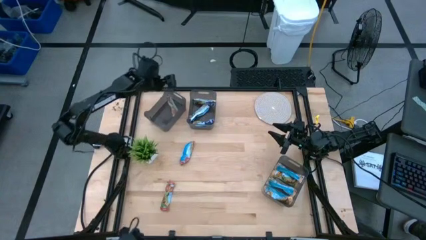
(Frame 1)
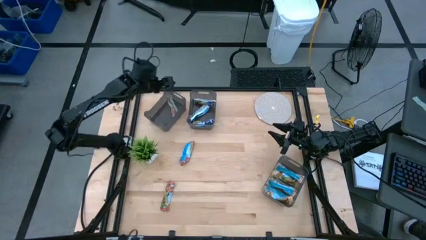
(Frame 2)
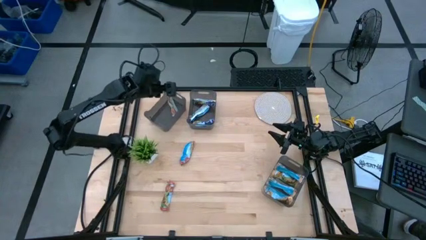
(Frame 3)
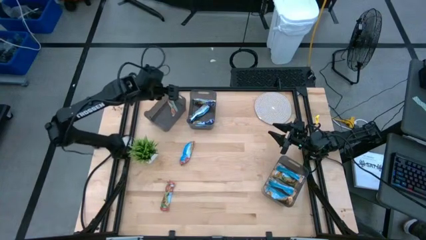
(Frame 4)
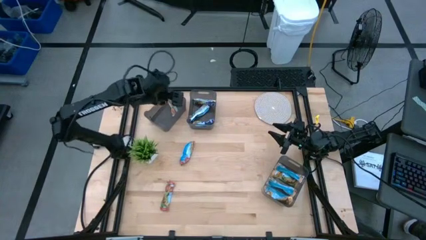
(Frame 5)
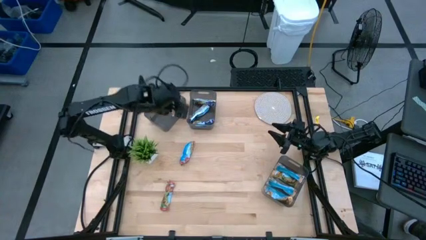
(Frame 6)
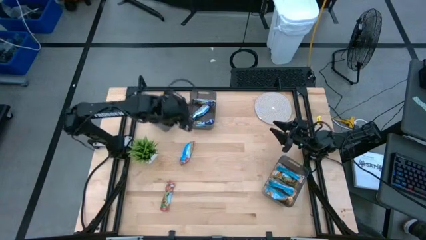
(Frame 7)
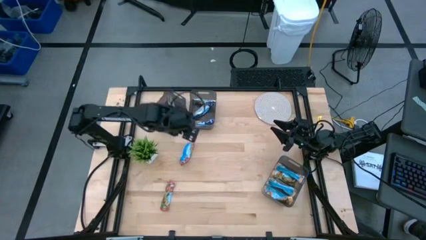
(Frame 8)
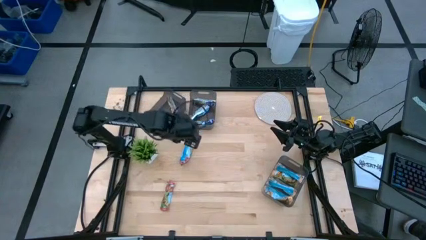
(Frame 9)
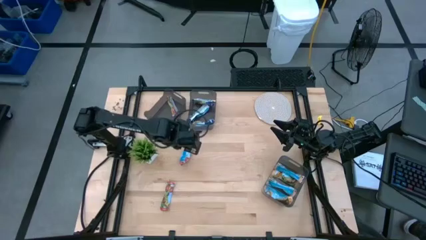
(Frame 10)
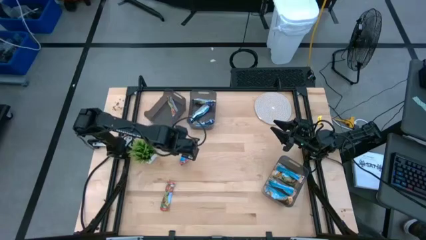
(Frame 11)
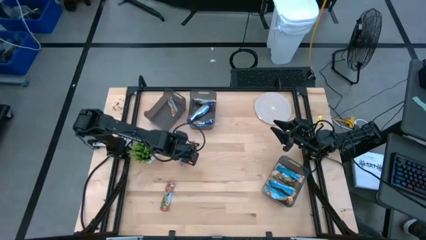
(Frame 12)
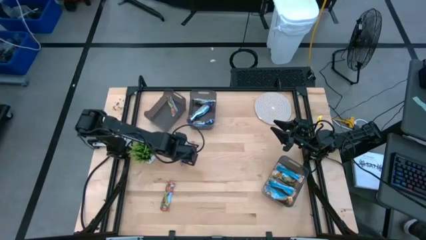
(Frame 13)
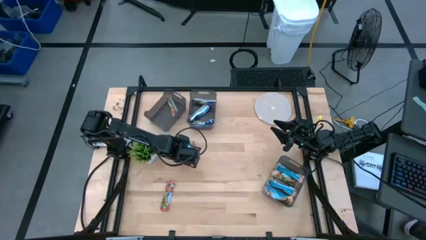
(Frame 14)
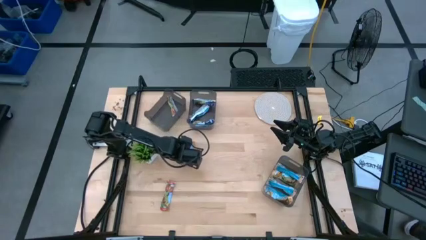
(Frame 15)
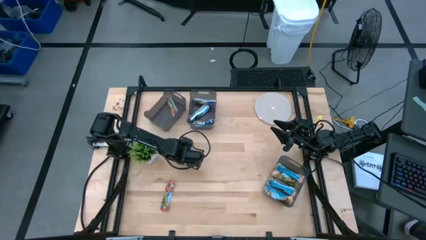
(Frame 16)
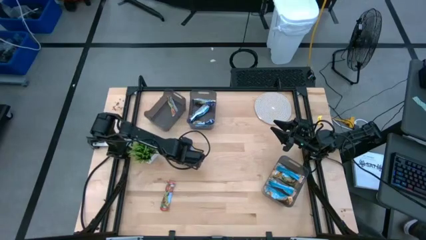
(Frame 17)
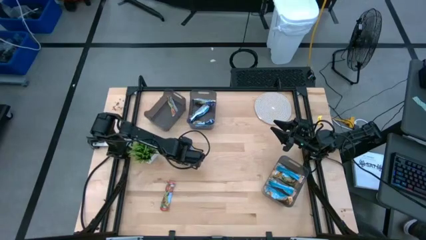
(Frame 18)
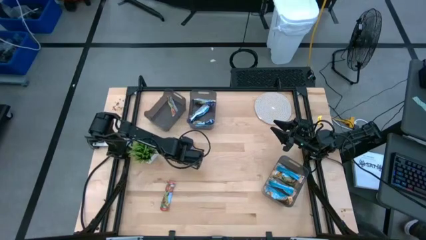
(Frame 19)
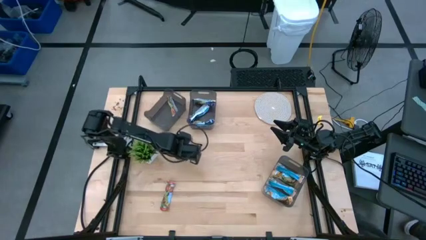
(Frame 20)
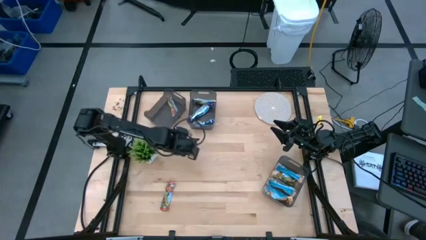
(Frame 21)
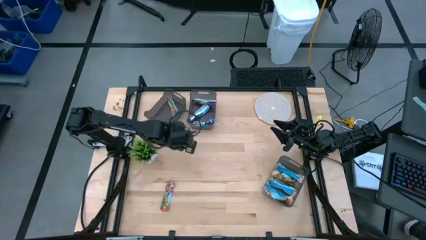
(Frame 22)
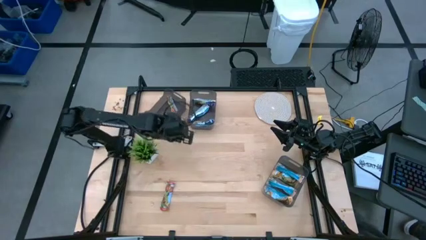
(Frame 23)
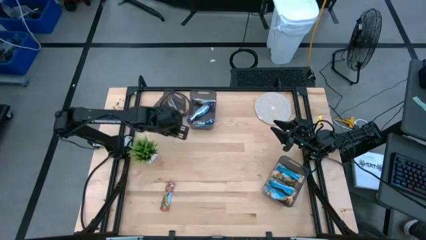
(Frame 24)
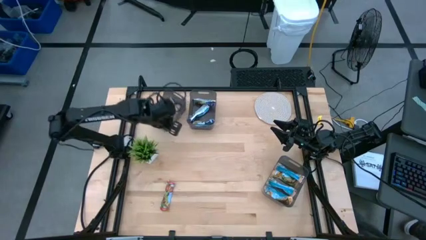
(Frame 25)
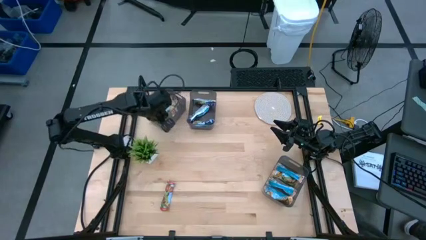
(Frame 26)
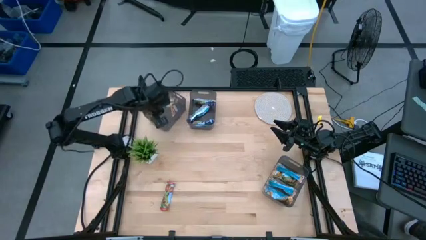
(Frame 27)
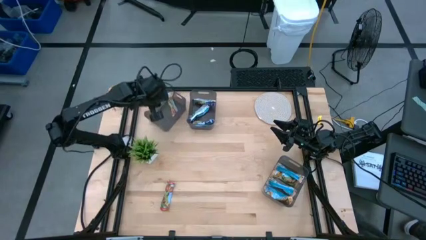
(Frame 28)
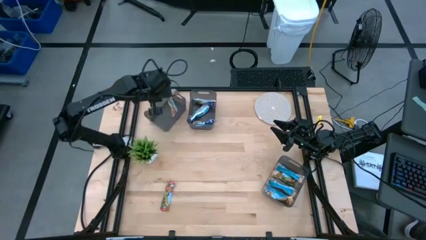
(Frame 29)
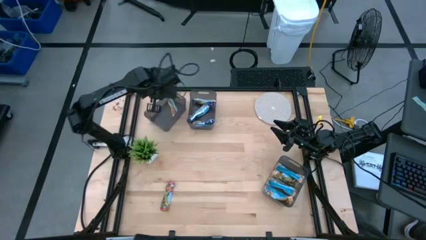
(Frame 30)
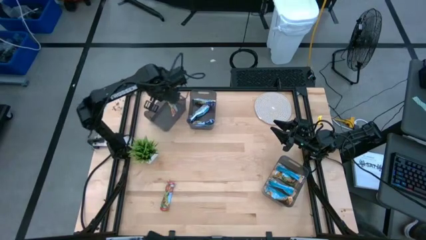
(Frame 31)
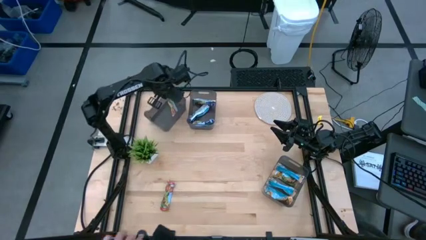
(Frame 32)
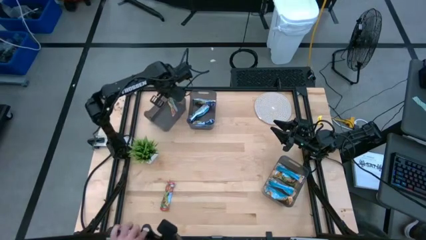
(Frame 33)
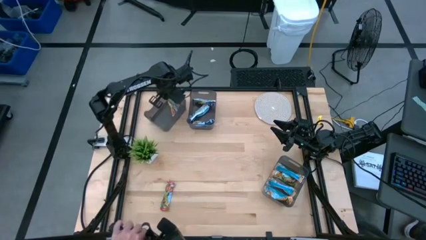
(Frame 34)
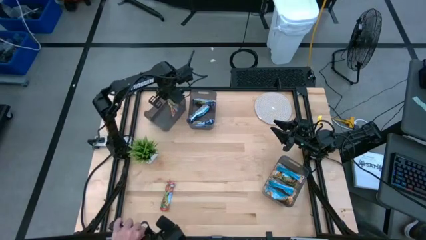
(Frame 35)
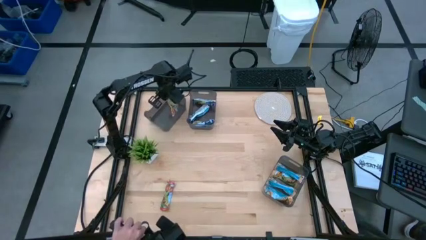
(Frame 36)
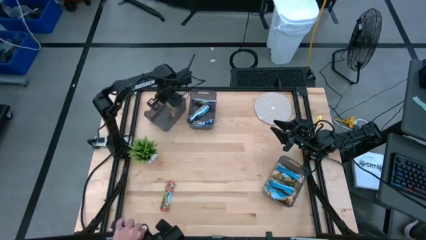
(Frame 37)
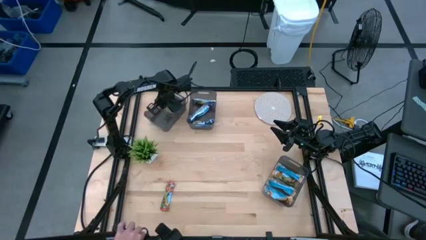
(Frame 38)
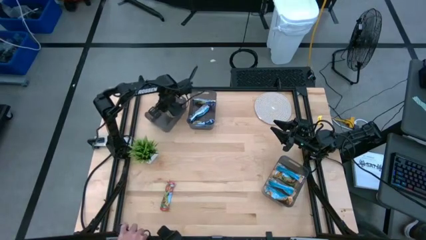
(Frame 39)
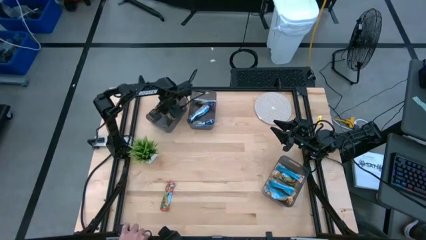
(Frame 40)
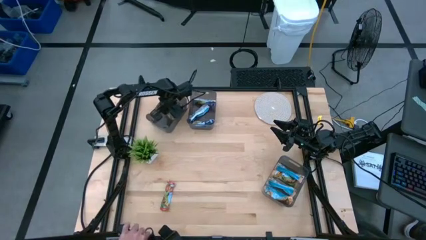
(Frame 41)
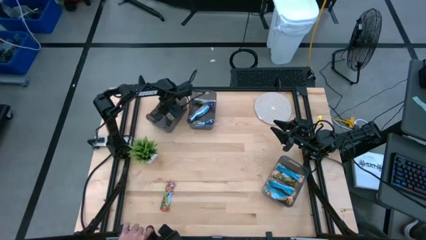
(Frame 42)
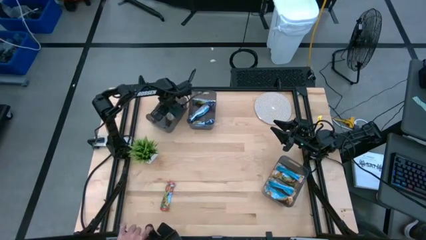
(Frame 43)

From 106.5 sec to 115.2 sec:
Task: Pick and place Granola Bars by type
Put the red granola bar into the top left black transparent bin

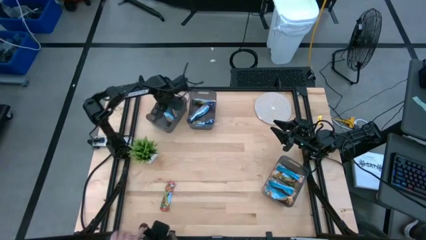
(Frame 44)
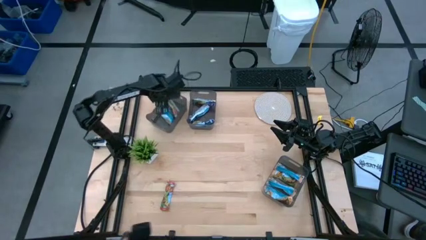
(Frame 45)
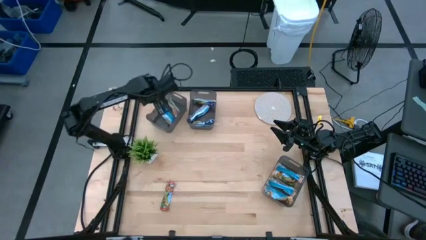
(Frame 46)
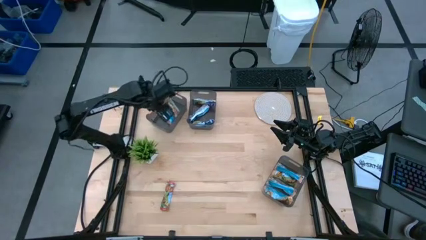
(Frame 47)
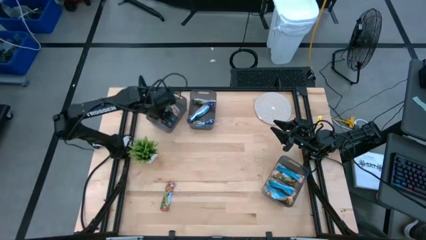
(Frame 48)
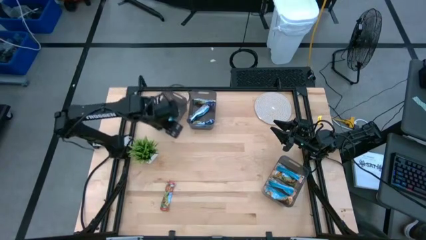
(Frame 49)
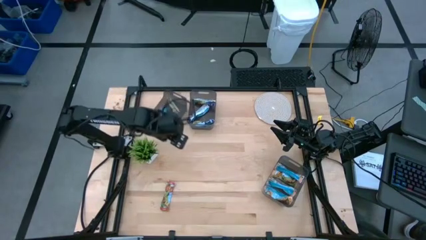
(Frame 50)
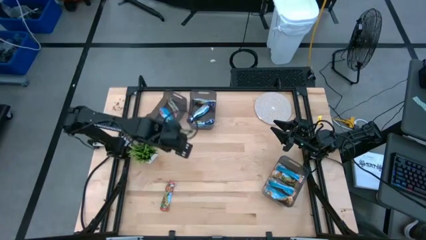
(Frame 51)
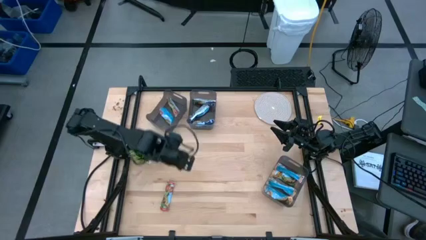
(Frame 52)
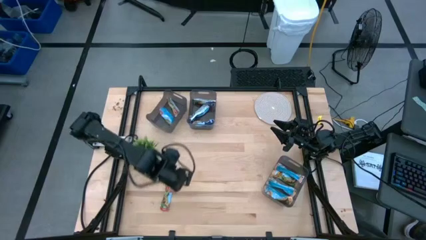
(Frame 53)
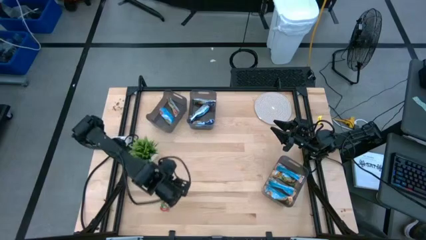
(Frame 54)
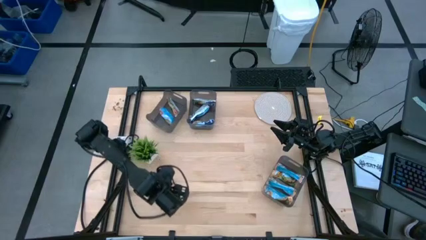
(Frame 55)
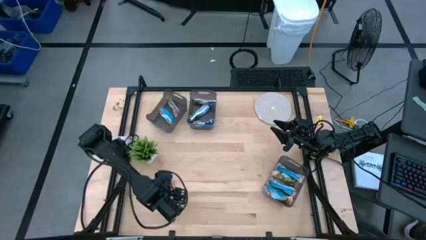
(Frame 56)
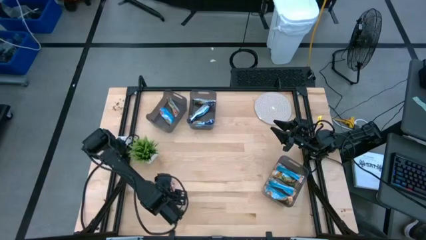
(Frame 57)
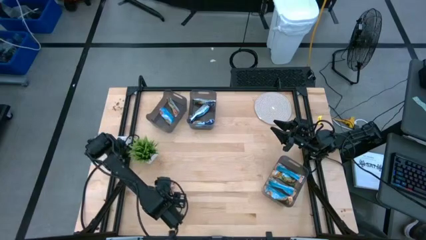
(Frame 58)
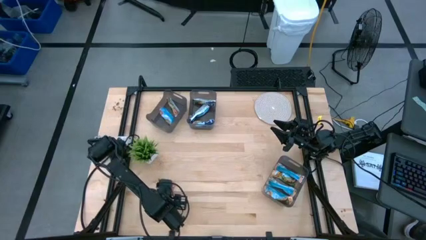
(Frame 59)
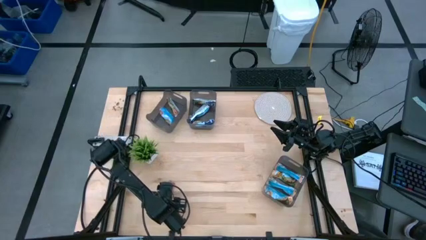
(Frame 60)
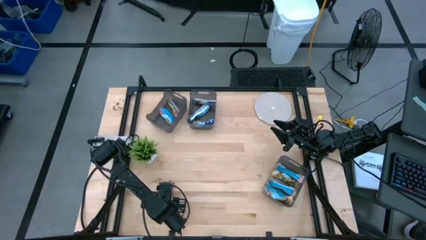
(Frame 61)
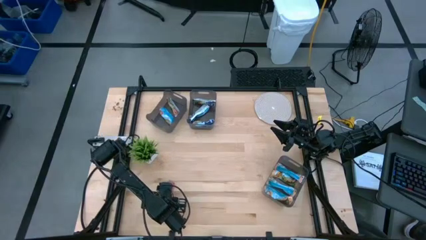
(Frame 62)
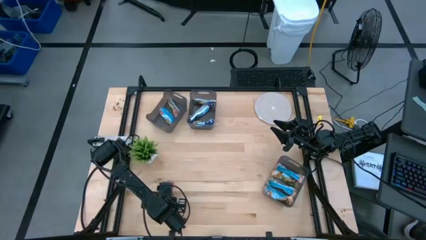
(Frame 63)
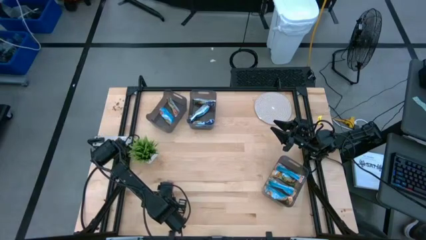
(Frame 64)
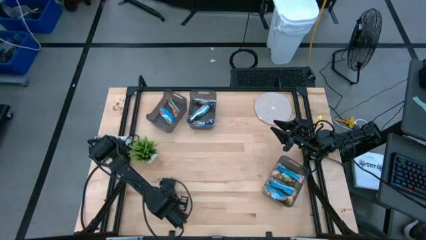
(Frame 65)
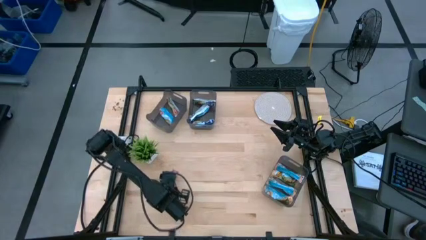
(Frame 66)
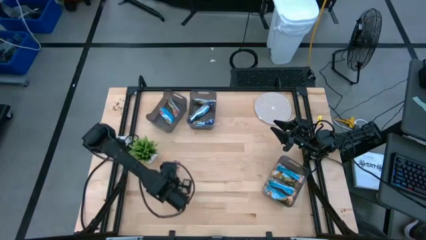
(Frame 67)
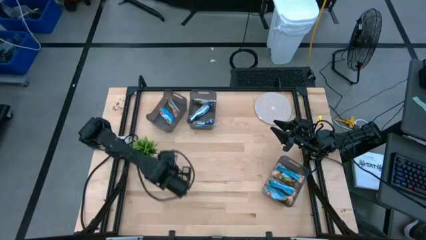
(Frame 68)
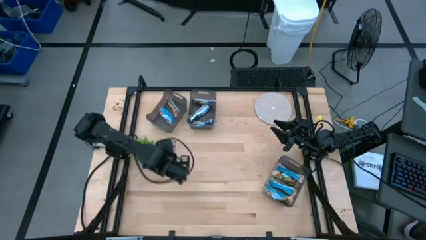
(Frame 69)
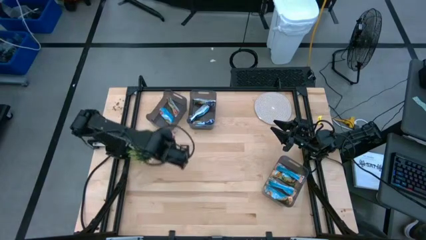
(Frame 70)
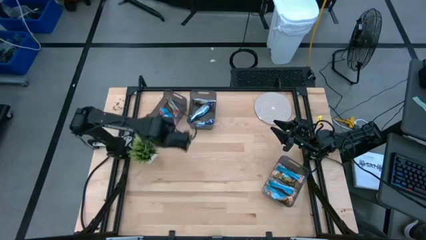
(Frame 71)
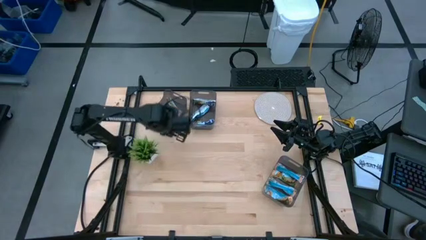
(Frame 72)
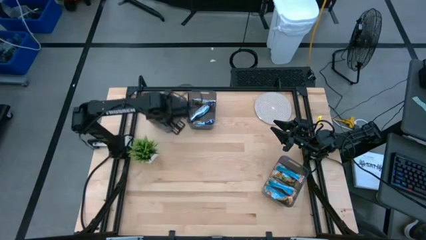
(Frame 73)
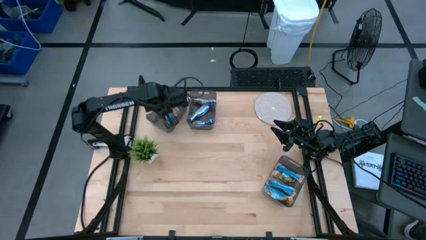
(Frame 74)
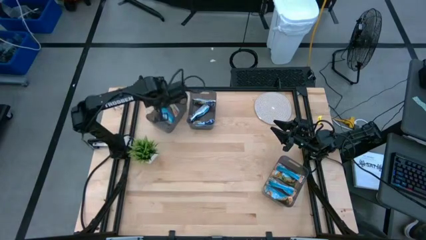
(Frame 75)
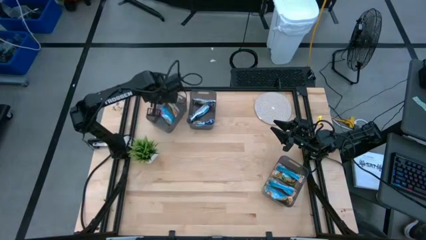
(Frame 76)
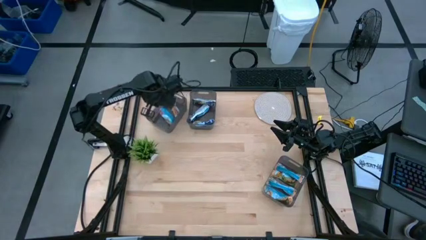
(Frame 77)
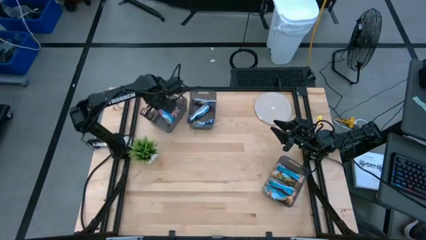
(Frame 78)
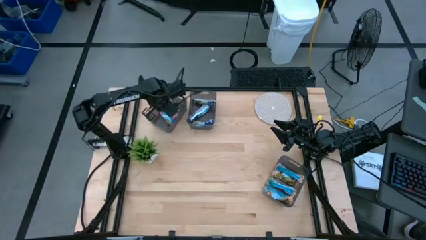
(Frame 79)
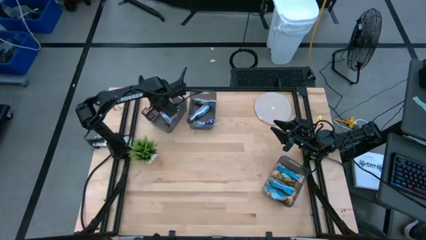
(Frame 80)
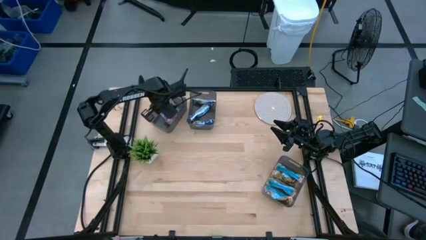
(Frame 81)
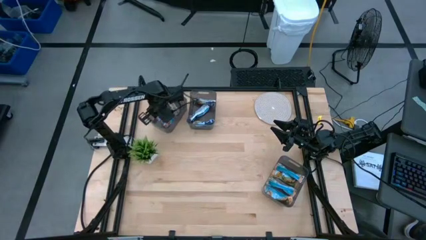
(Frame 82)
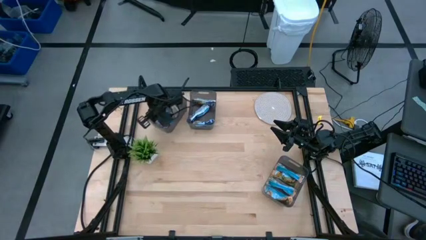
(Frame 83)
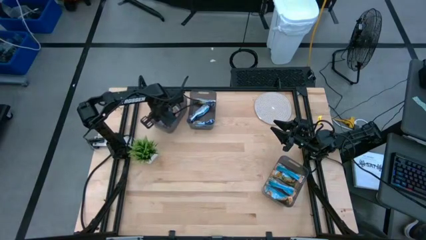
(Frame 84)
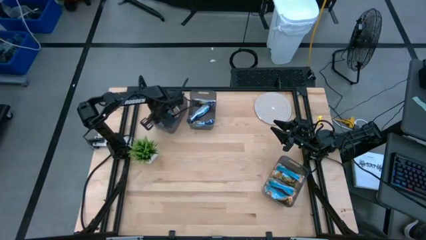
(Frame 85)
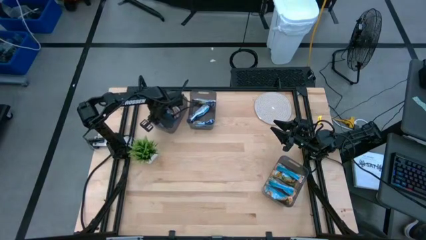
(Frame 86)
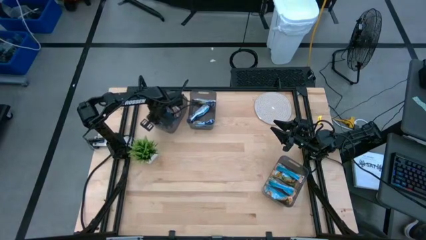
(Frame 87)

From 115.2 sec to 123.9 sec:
Put the red granola bar into the top left black transparent bin
